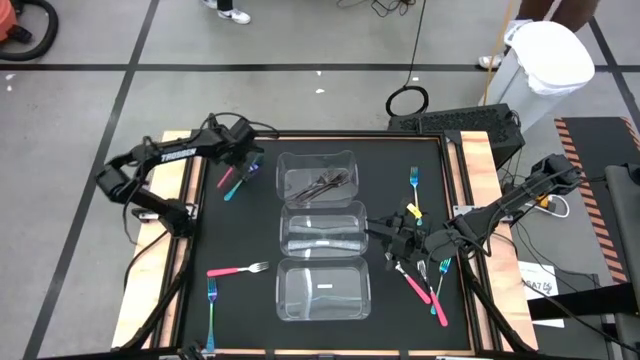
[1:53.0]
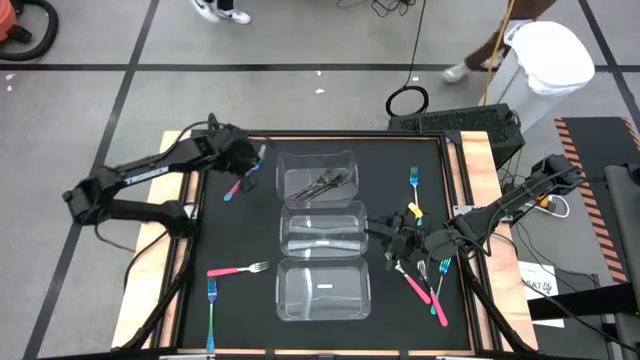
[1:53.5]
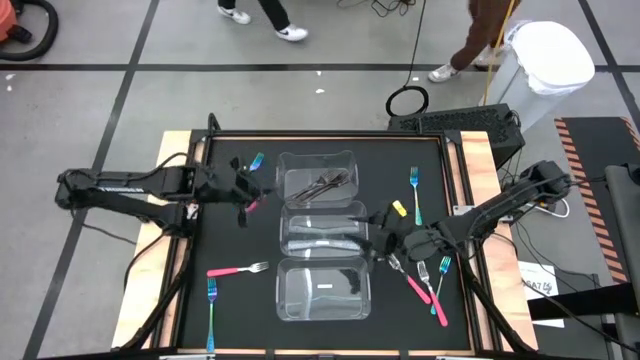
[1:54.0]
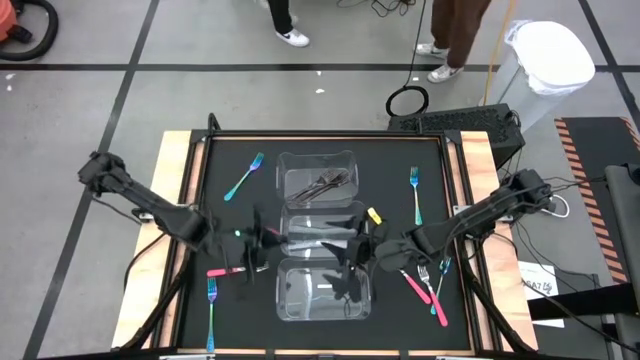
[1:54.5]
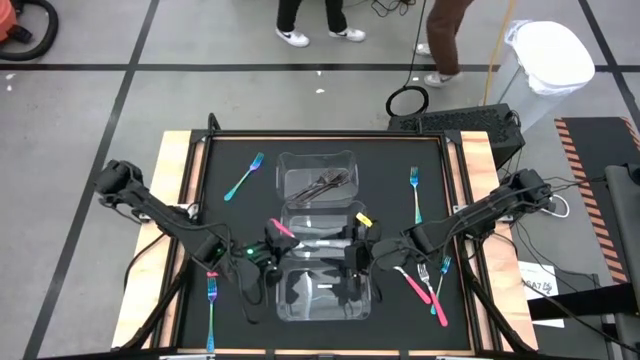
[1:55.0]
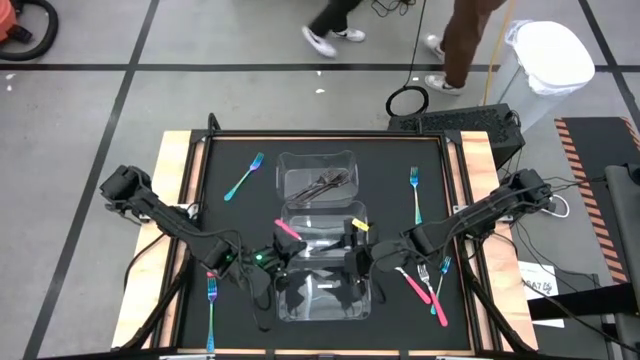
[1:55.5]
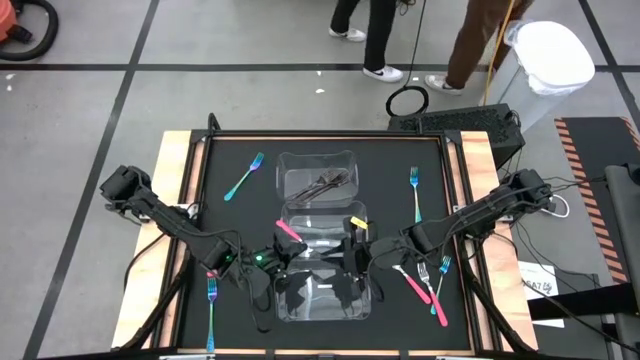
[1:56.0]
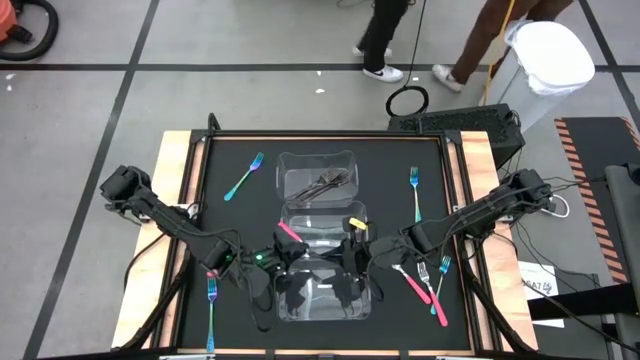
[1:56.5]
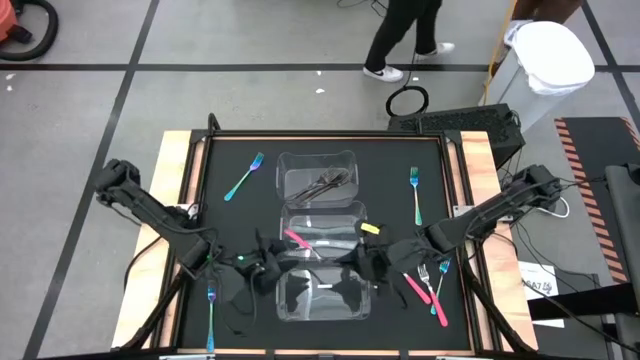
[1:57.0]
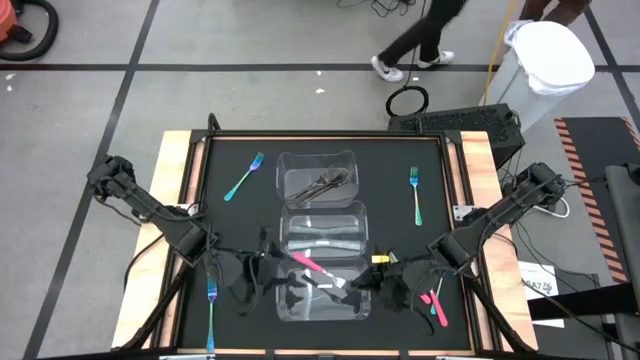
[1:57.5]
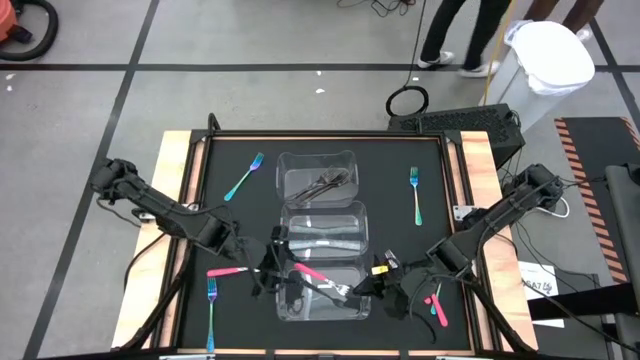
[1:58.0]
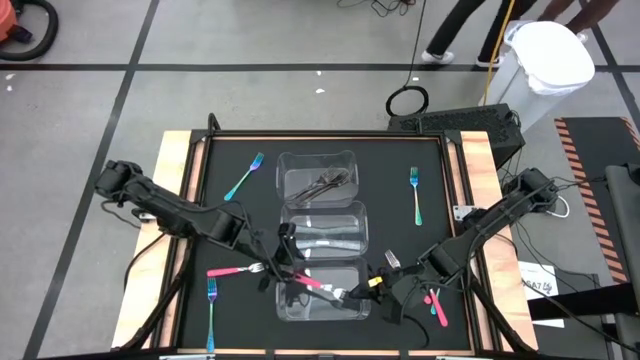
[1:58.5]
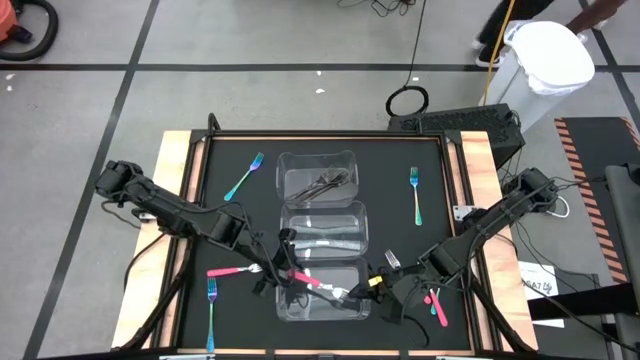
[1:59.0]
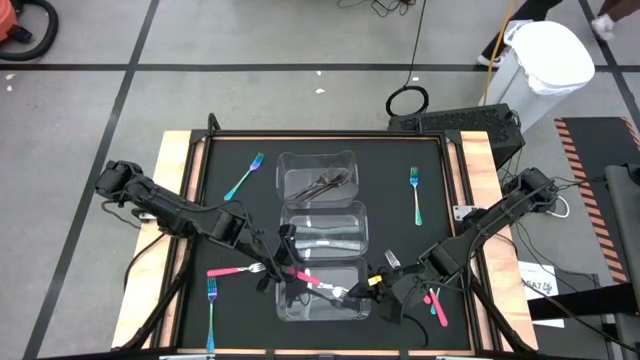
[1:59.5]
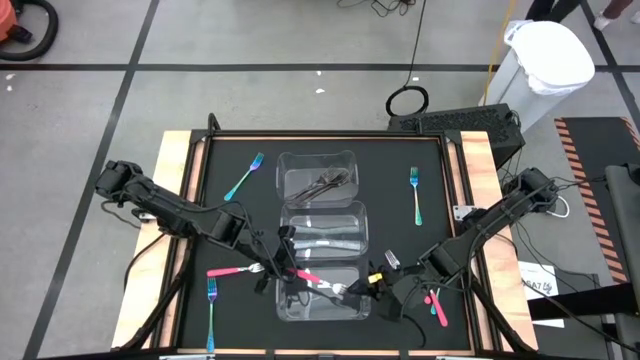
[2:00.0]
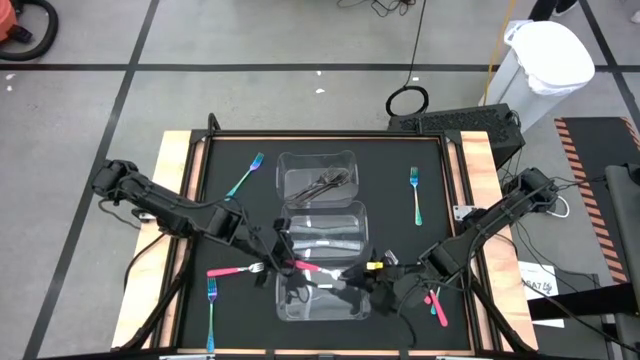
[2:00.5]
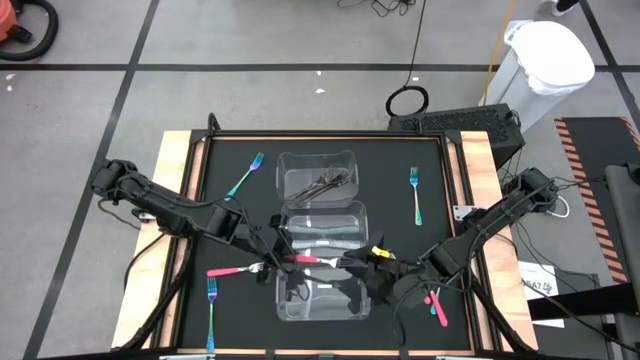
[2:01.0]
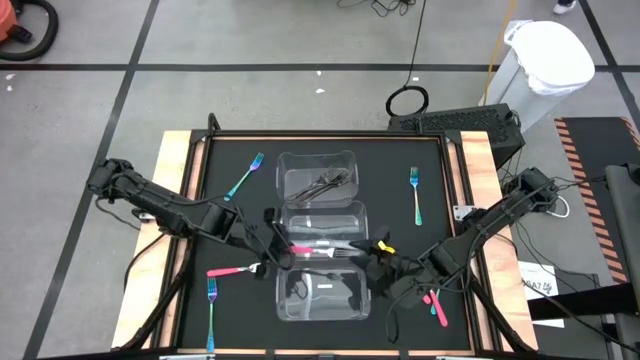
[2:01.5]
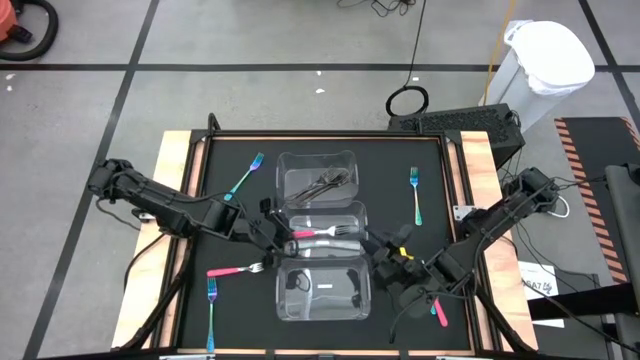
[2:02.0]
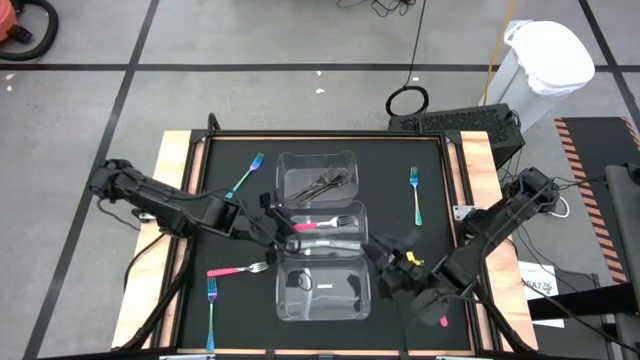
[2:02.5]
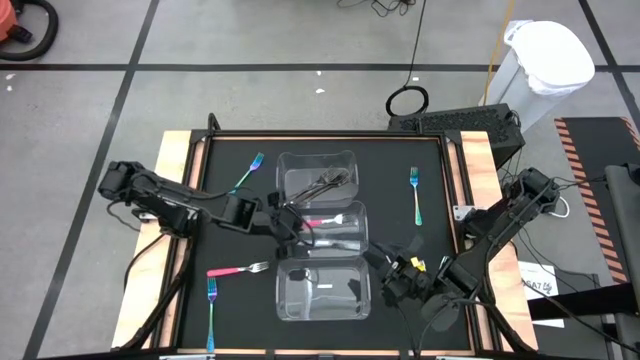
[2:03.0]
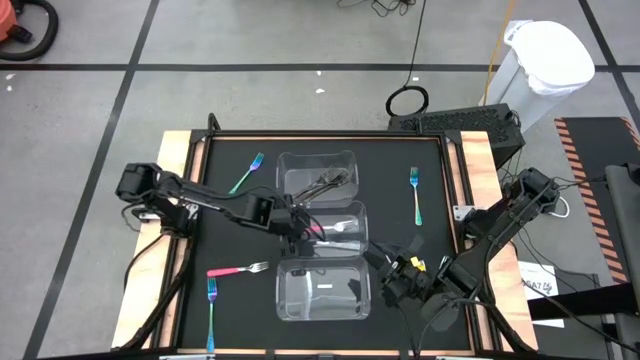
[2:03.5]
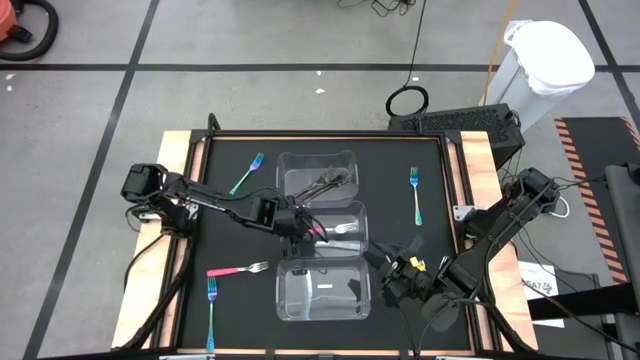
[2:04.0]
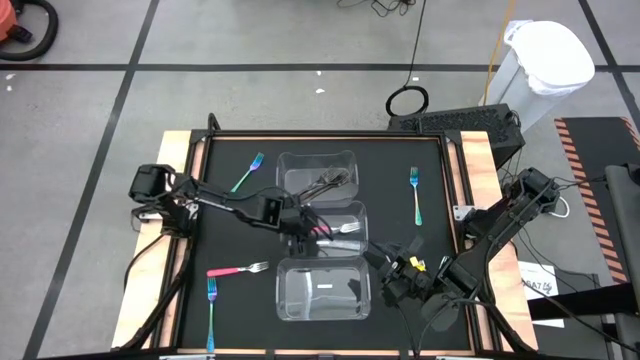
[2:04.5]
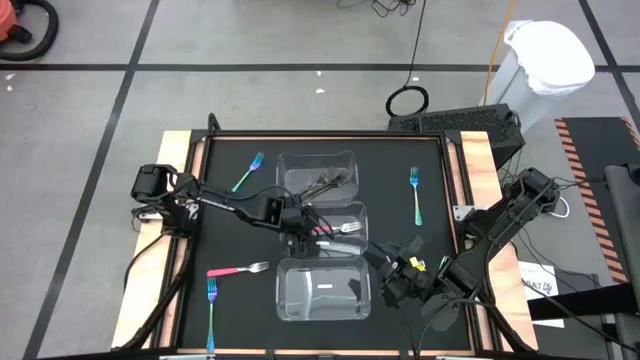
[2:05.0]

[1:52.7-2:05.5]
Task: Sort silverware by color (type)
Put the top left pink fork into the middle transparent bin

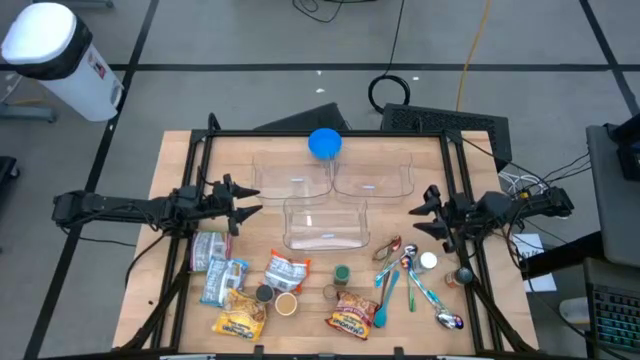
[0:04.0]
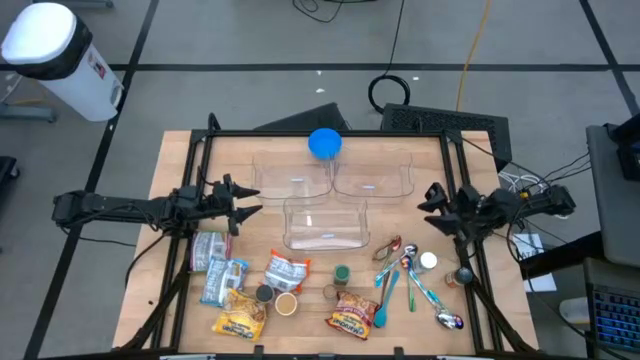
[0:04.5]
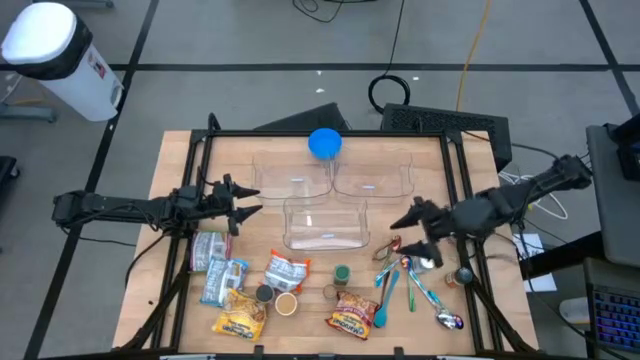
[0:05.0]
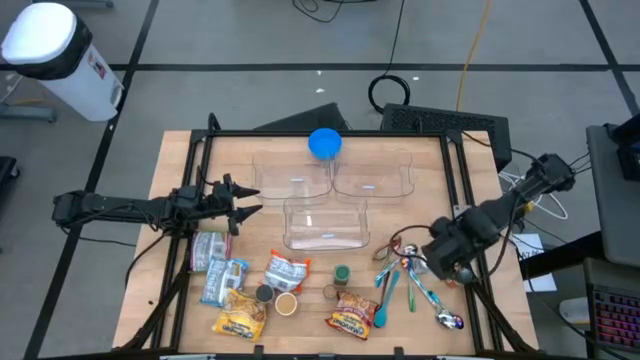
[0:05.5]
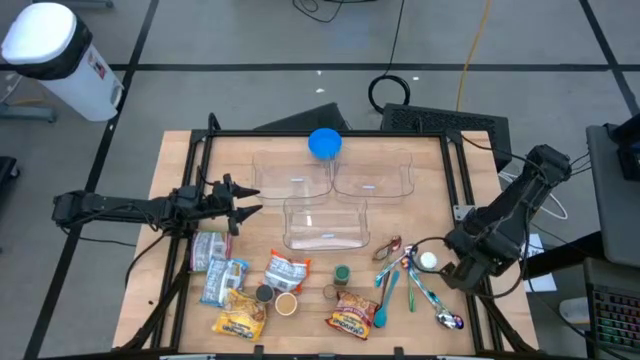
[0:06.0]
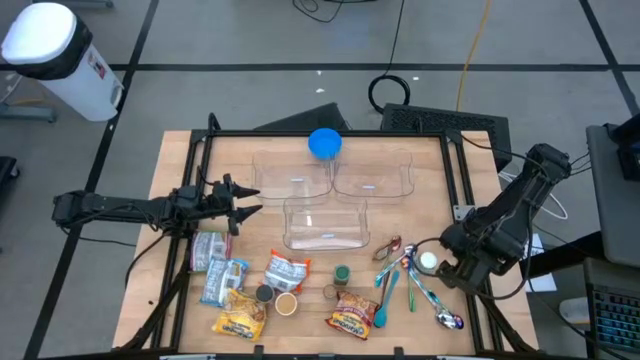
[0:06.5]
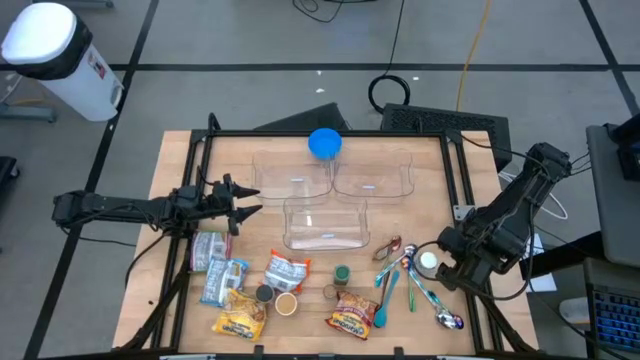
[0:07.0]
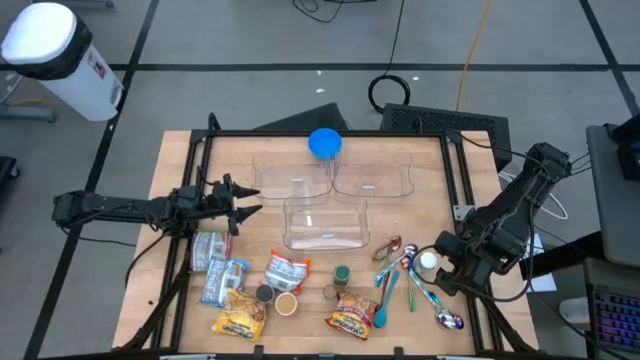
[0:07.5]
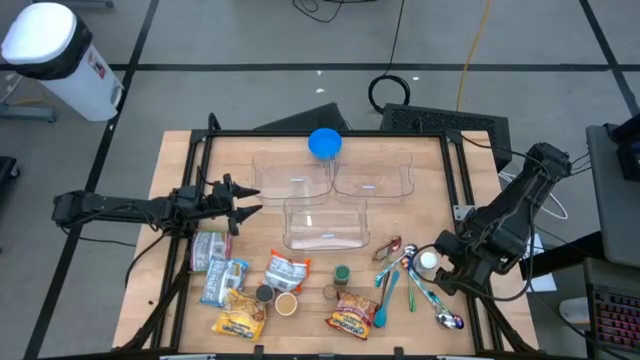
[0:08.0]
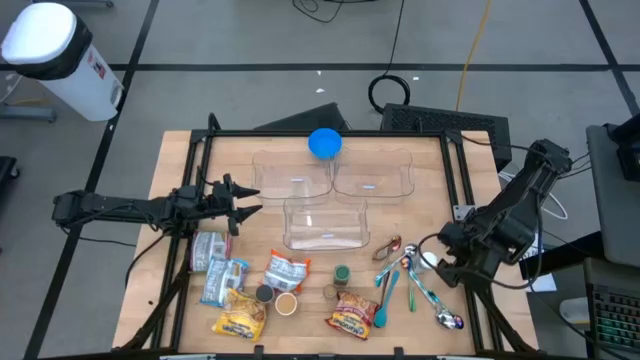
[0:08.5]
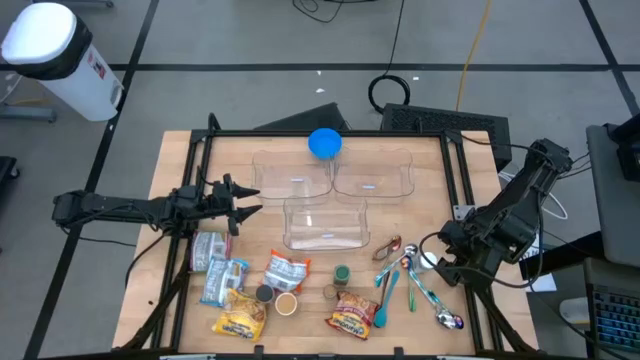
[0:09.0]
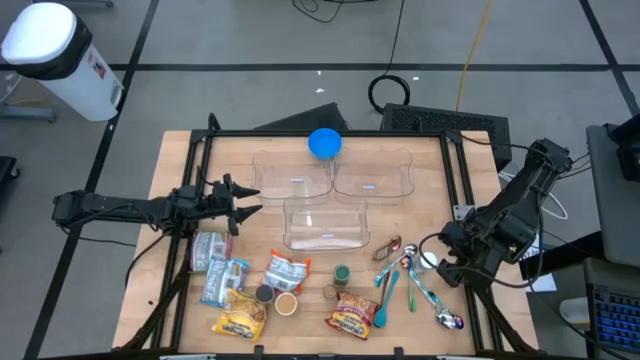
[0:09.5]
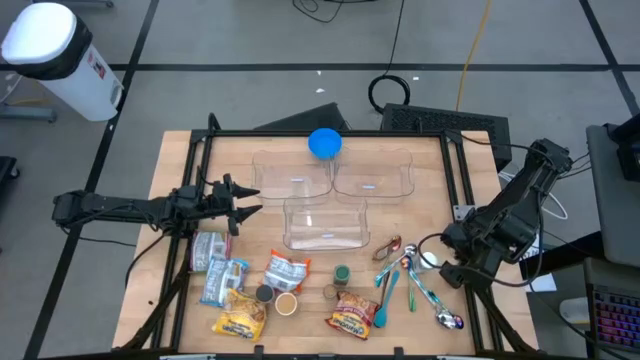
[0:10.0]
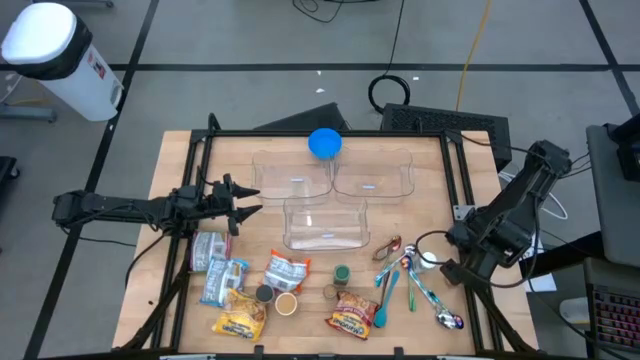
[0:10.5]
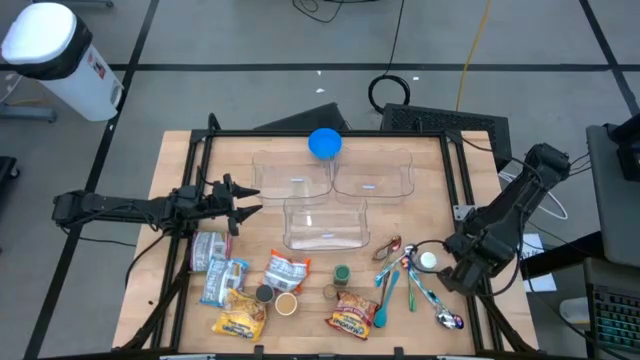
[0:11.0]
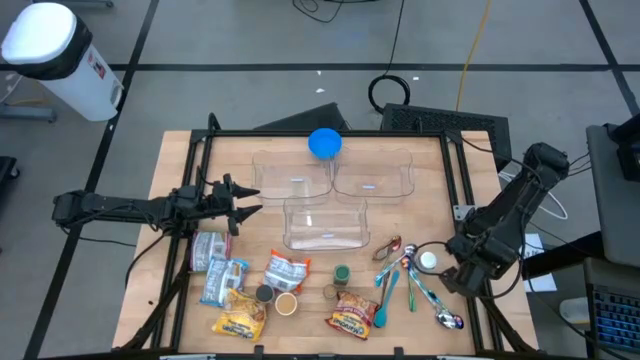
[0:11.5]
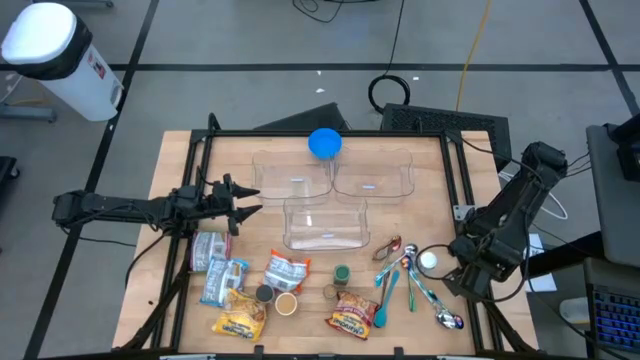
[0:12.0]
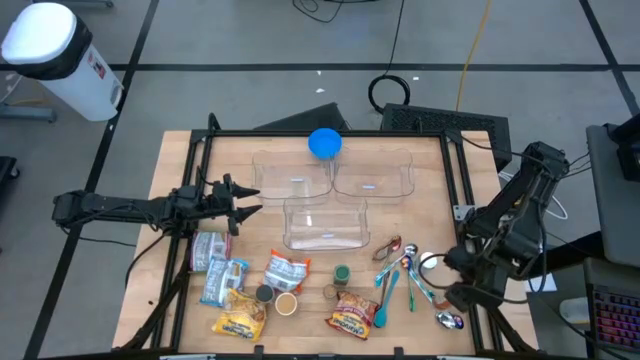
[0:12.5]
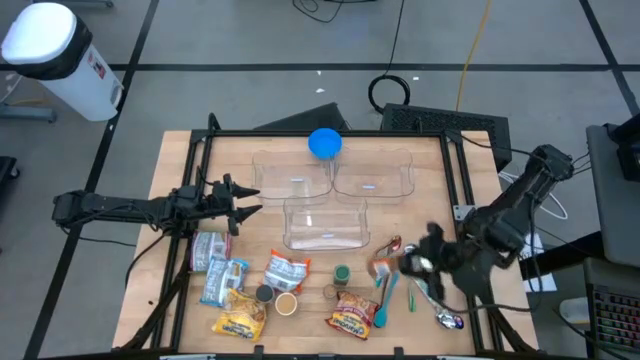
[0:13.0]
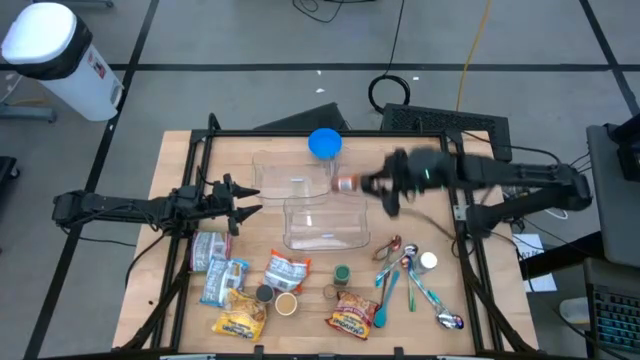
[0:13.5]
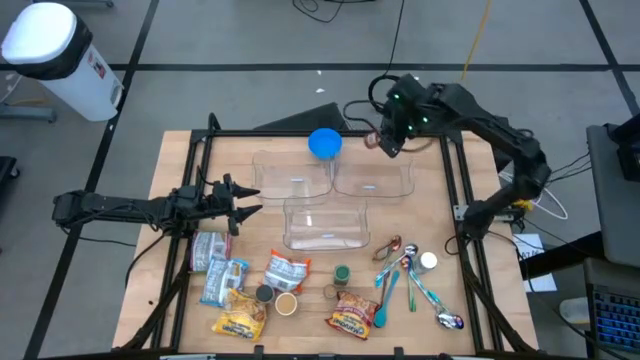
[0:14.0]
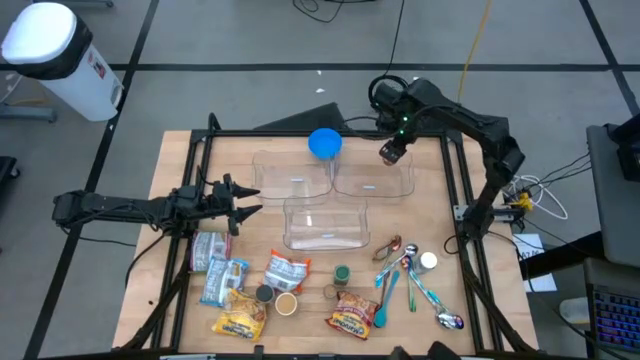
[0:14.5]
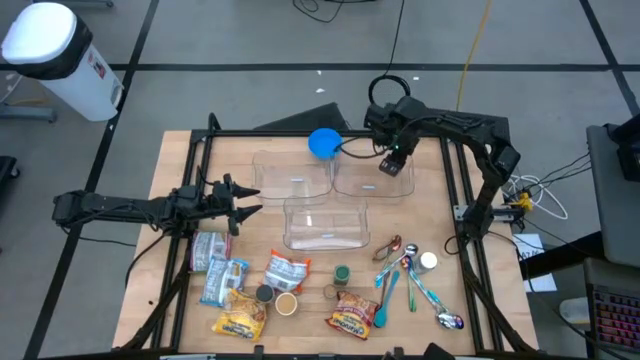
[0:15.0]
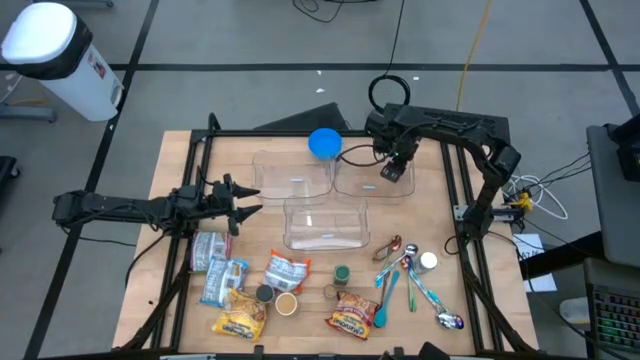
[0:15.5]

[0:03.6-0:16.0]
Task: Pick & Place Food Item
Put the black seasoning bottle into the top right transparent bin
